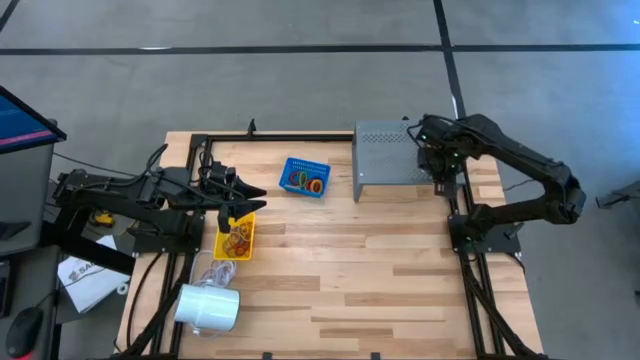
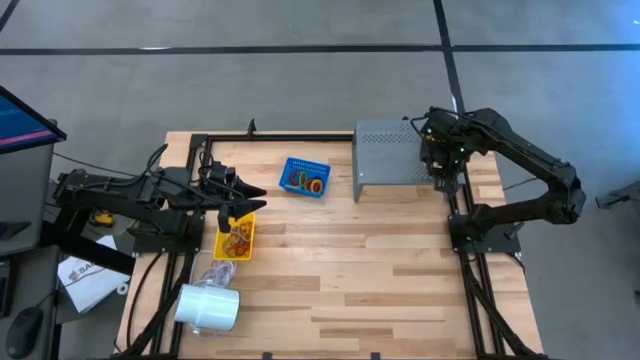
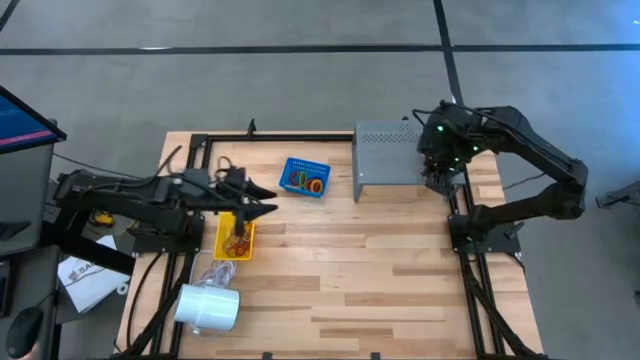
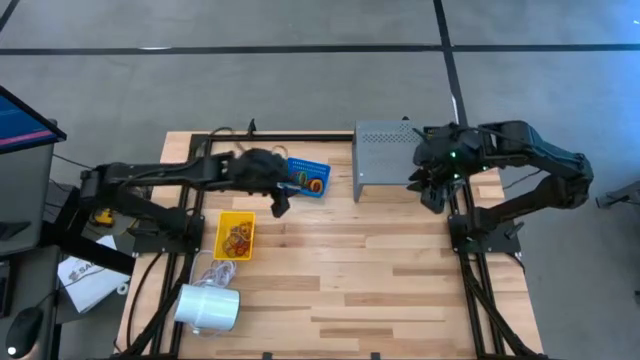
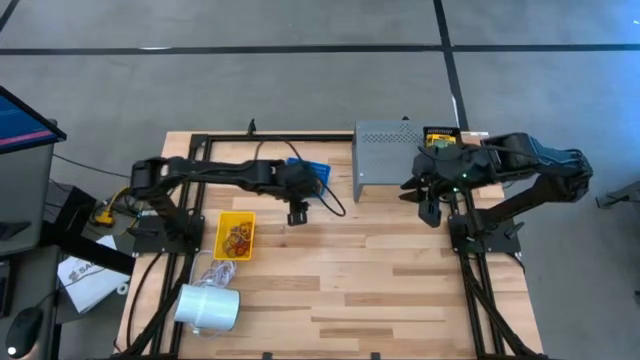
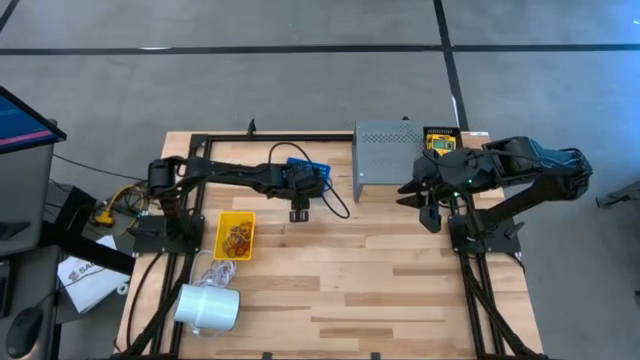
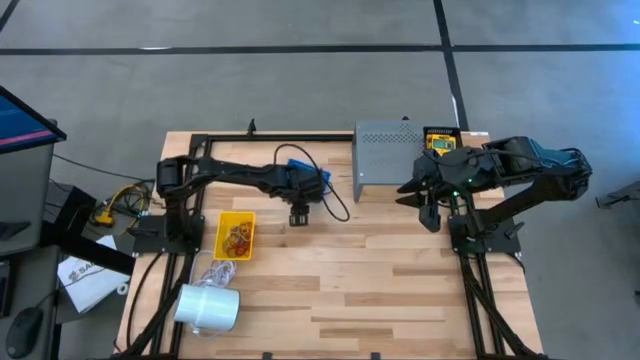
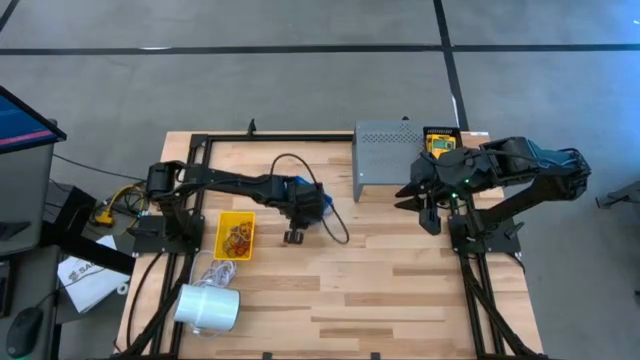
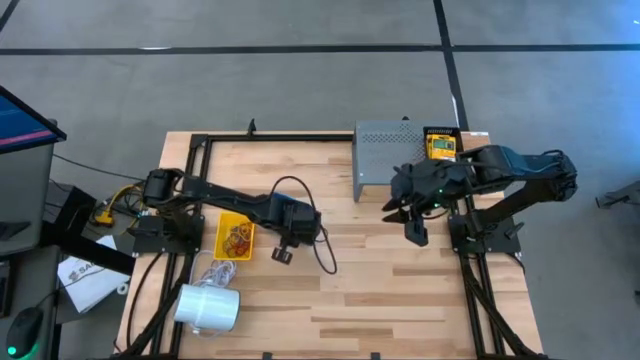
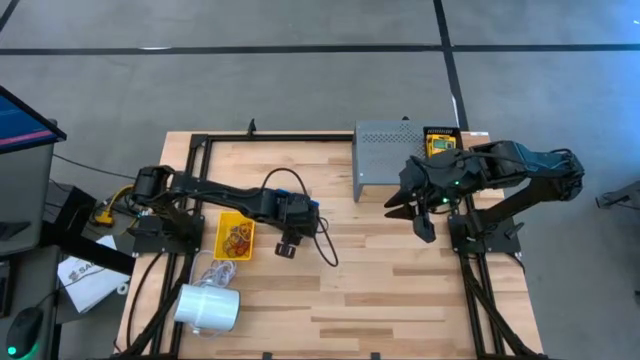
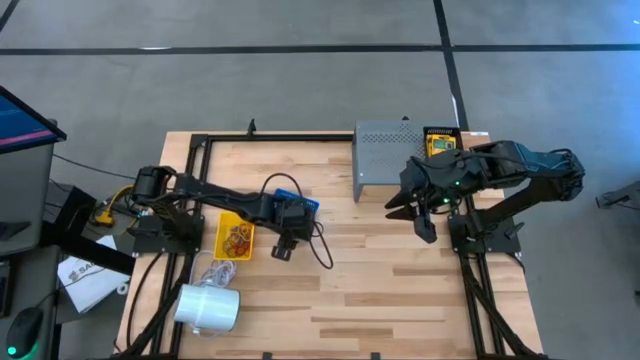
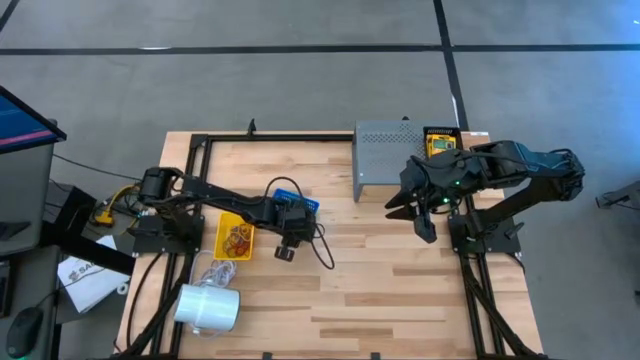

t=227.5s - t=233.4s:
Task: Pick & Place Office Desk Supplies
Put the blue bin with the colored spring keychain on the shelf

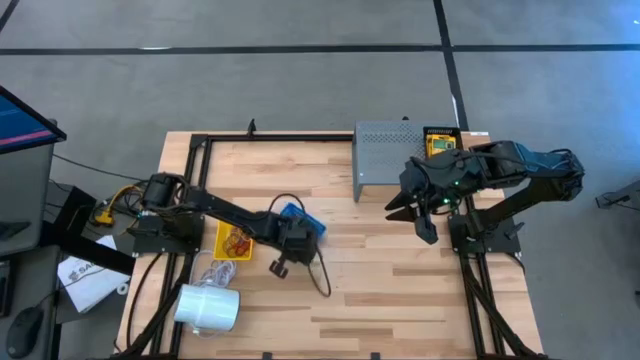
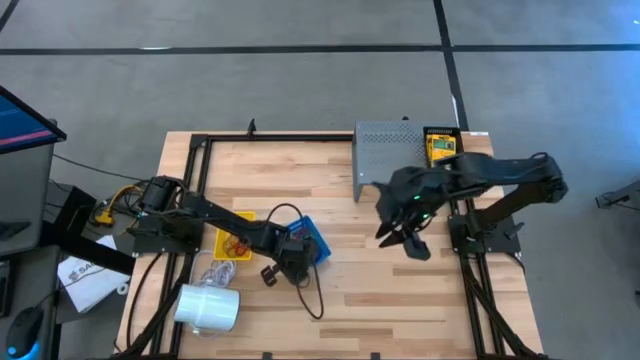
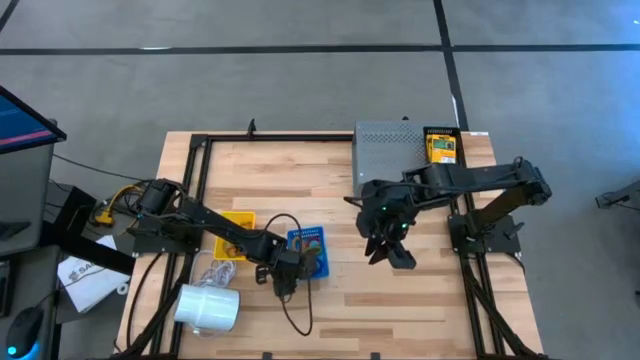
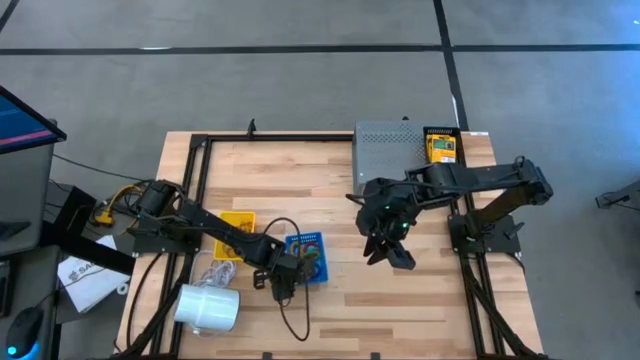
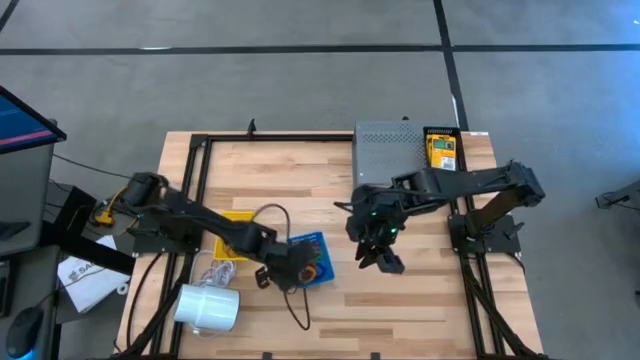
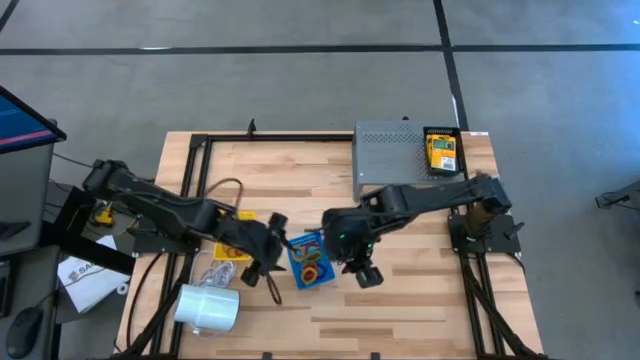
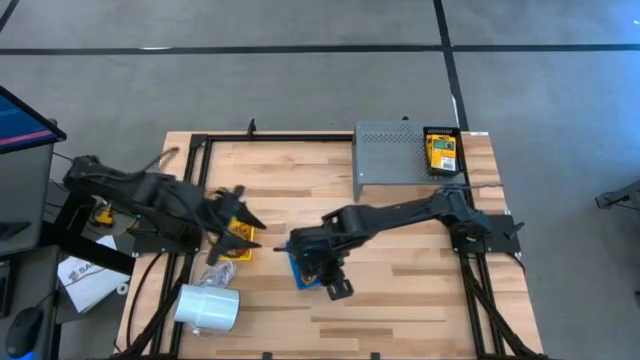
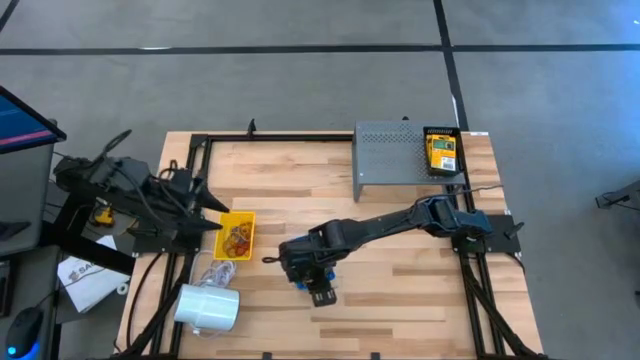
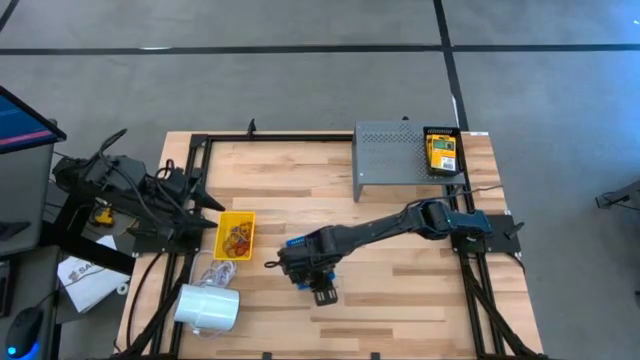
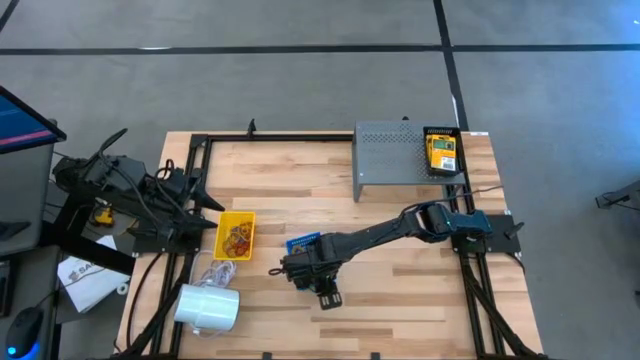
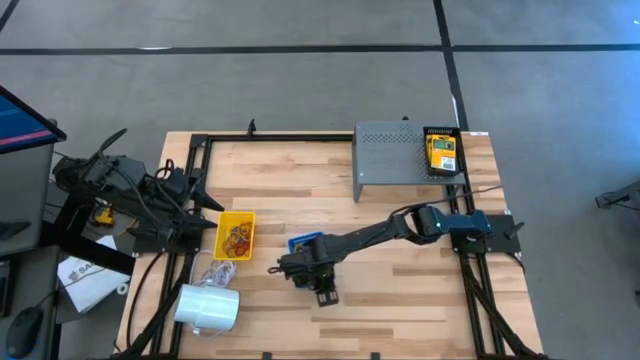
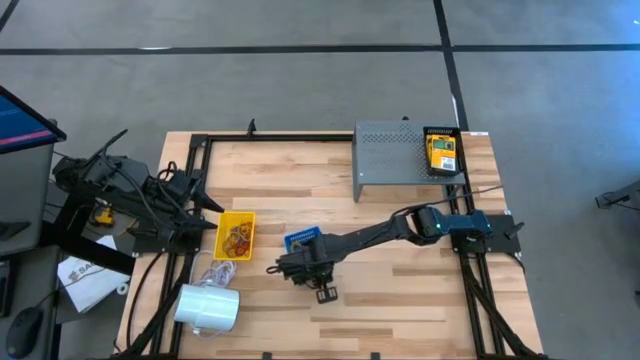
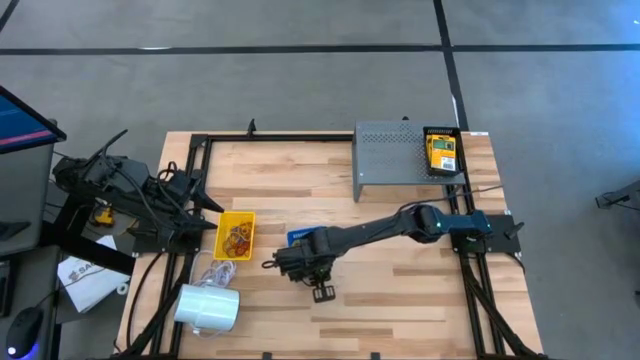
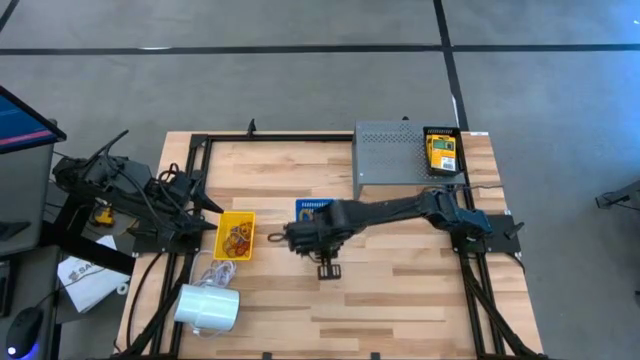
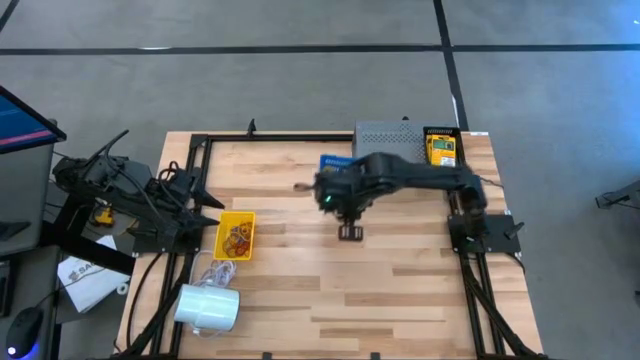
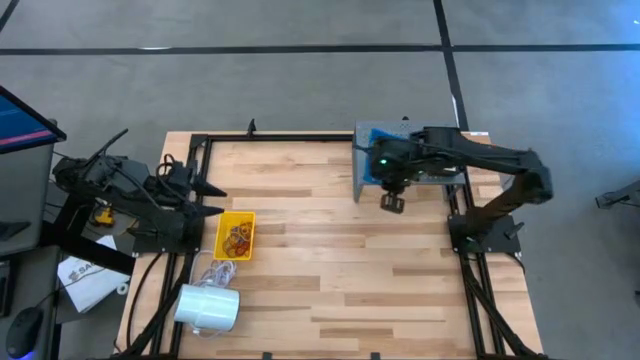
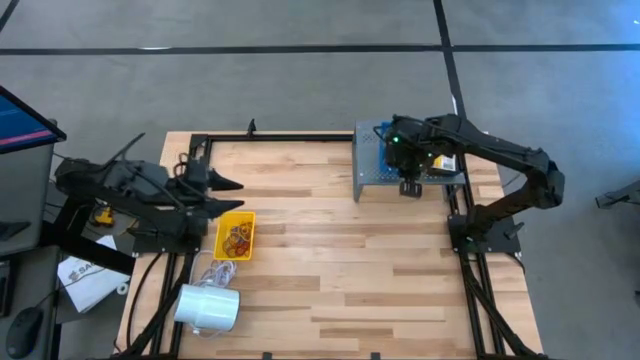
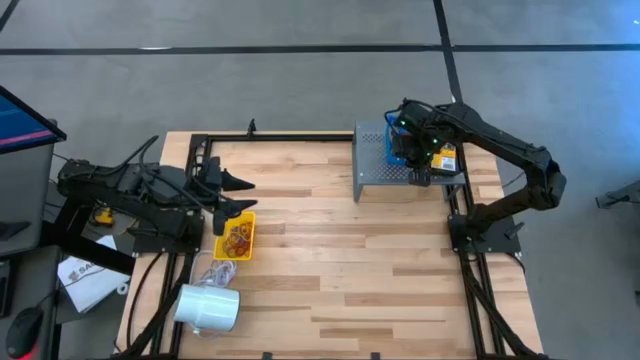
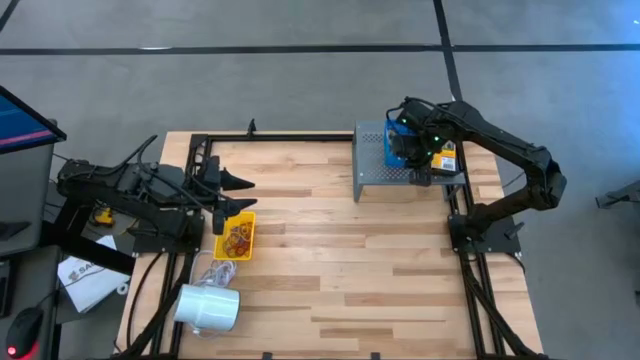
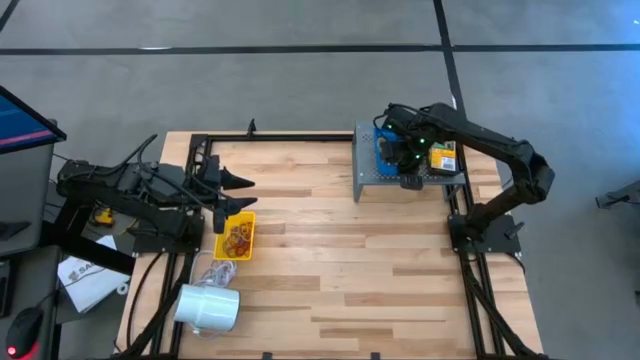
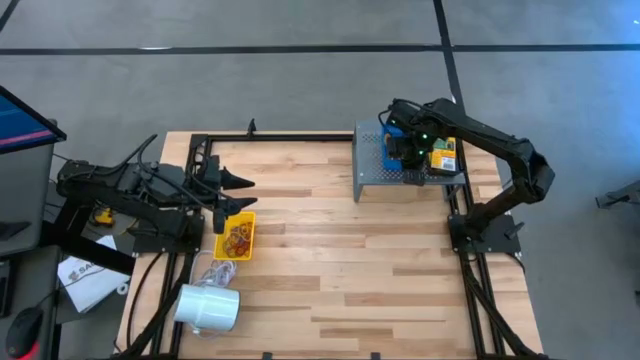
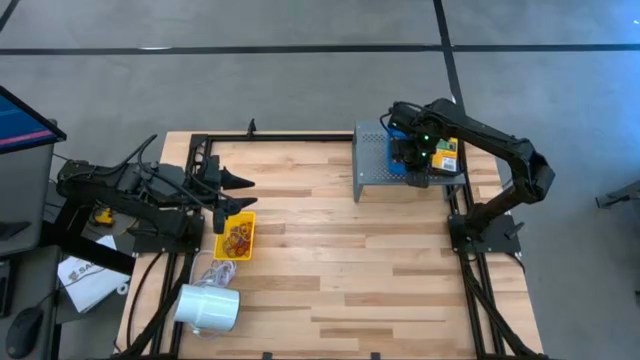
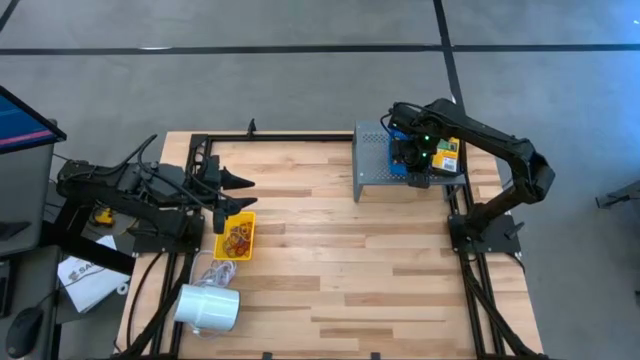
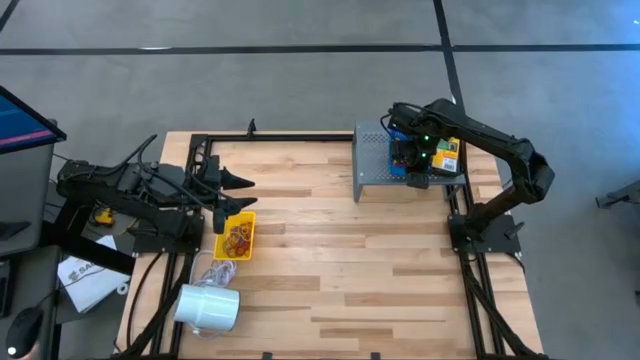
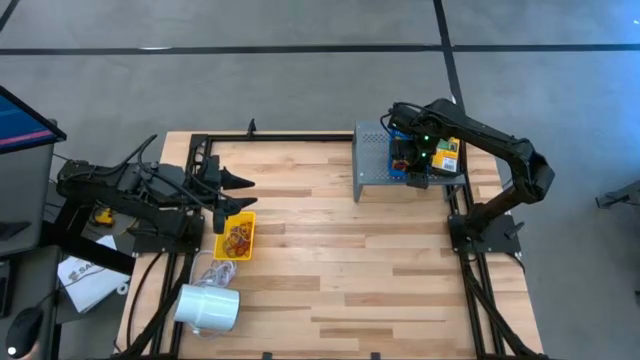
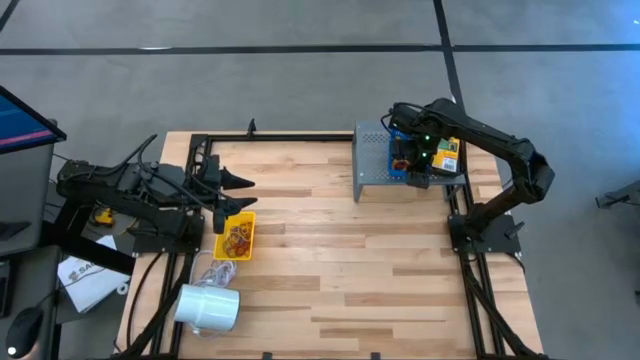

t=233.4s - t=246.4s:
Put the blue bin with the colored spring keychain on the shelf

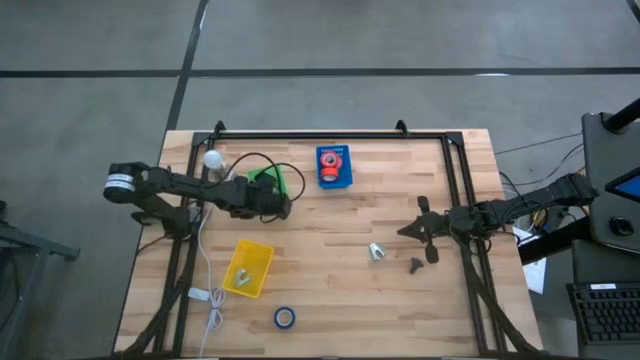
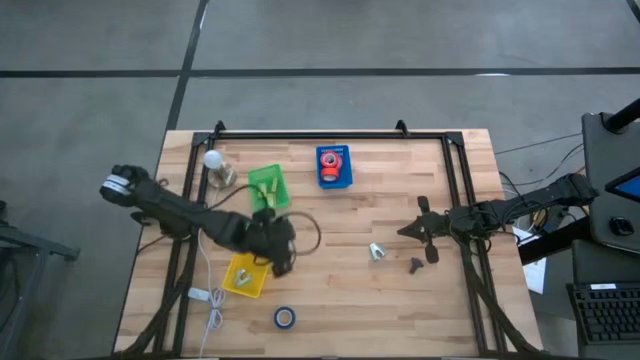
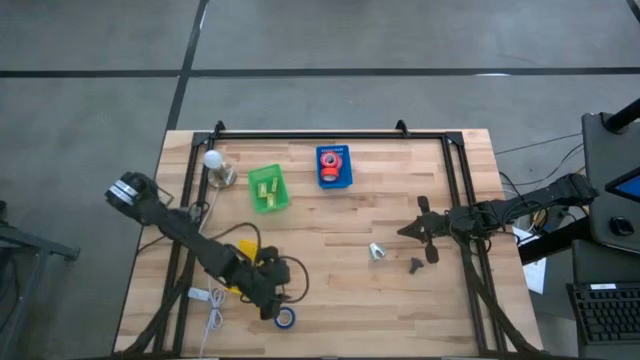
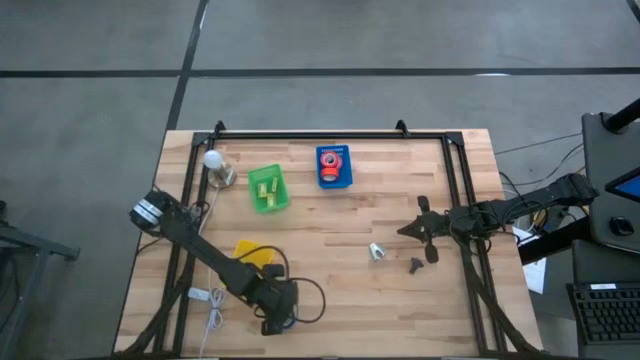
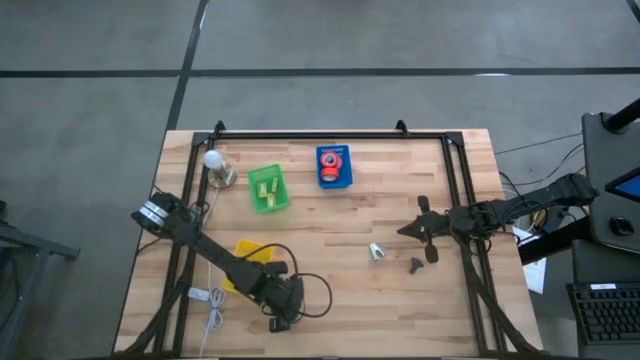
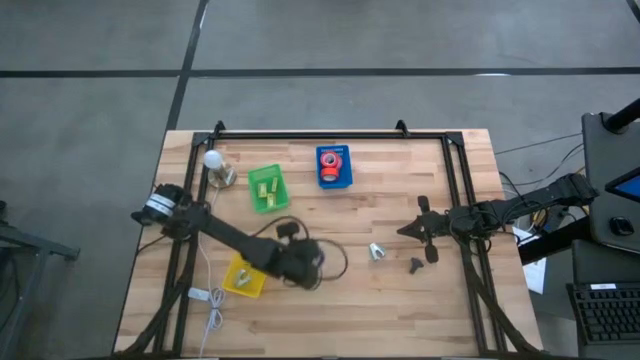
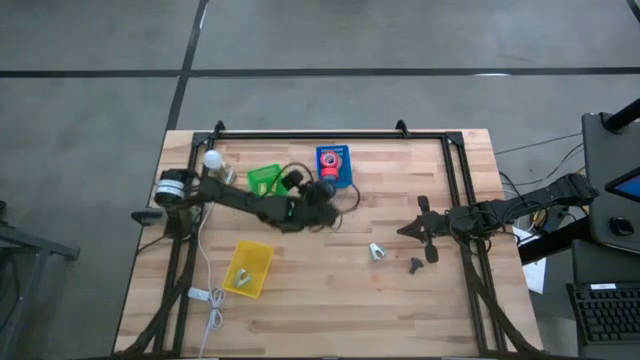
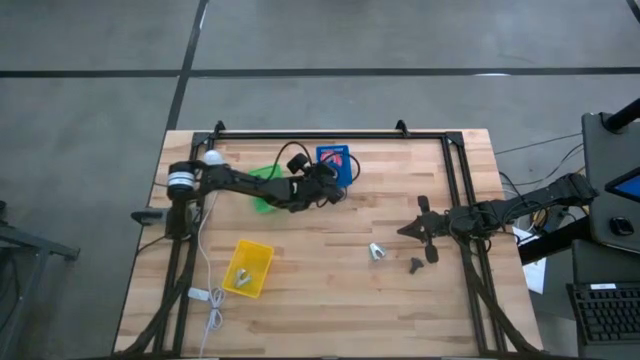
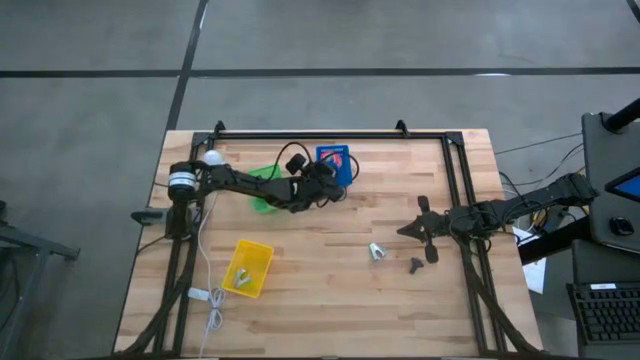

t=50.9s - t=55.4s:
Task: Pick and place Stapler, Stapler remover, tape
Put the blue tape into the blue bin
